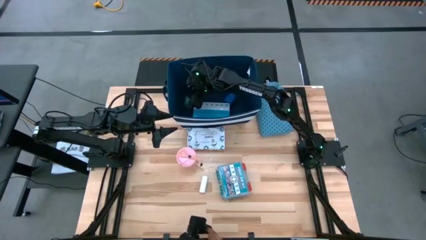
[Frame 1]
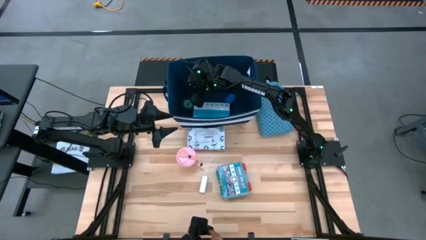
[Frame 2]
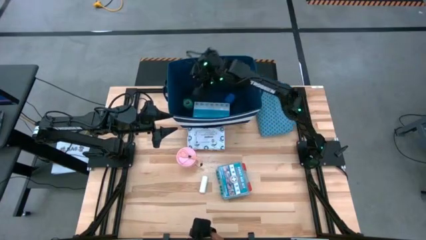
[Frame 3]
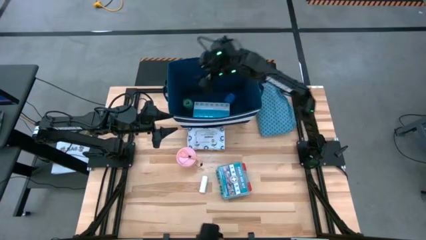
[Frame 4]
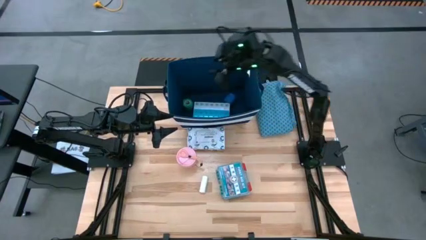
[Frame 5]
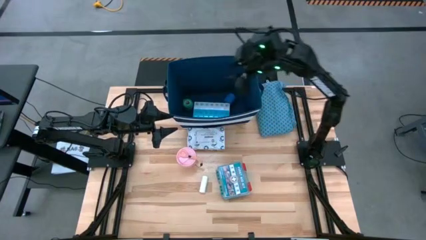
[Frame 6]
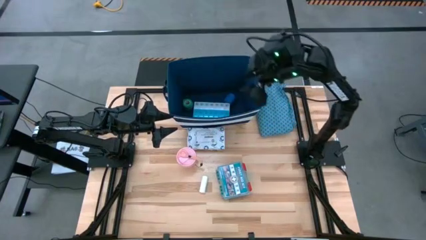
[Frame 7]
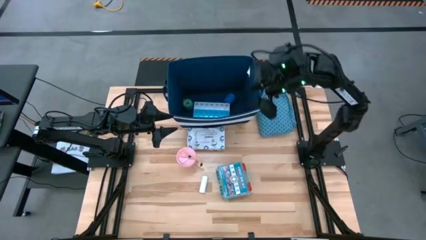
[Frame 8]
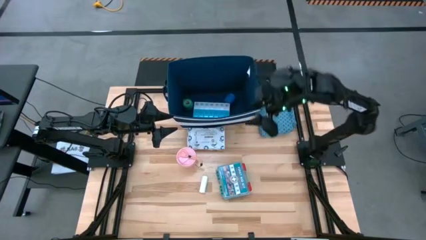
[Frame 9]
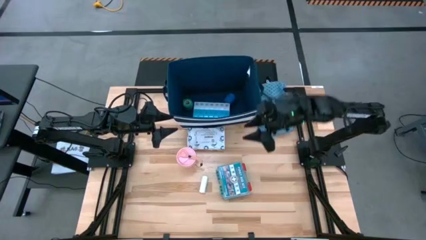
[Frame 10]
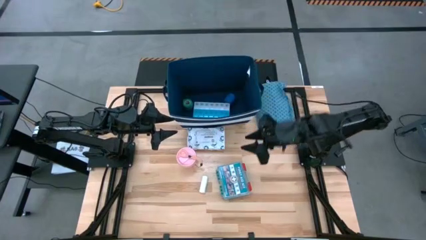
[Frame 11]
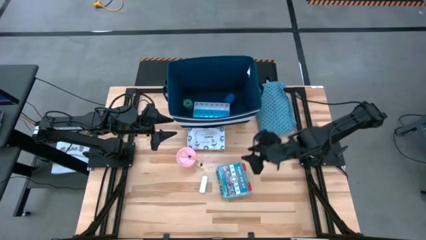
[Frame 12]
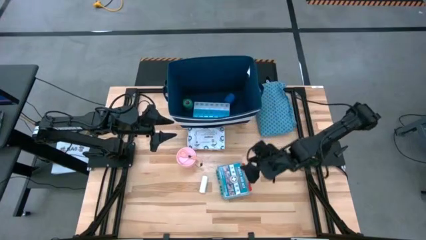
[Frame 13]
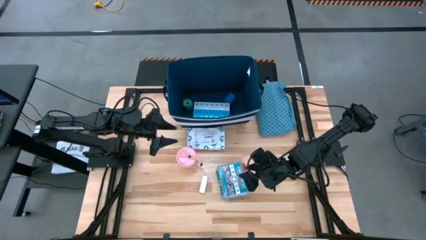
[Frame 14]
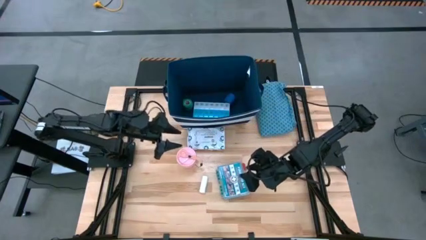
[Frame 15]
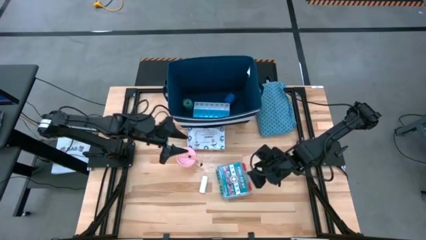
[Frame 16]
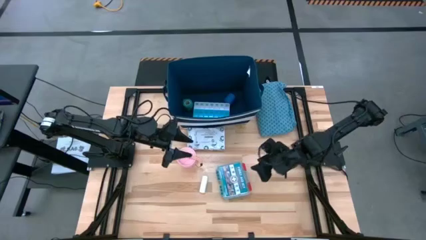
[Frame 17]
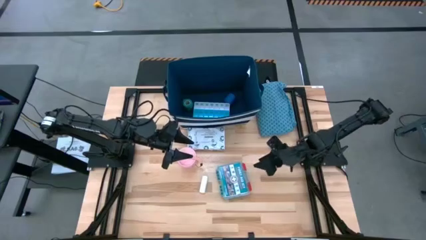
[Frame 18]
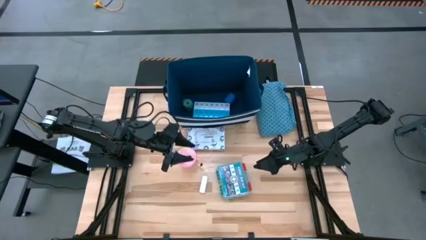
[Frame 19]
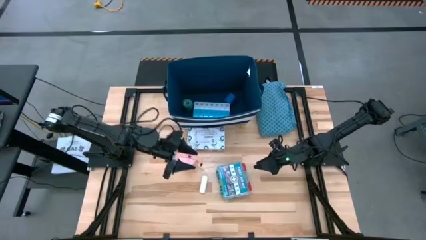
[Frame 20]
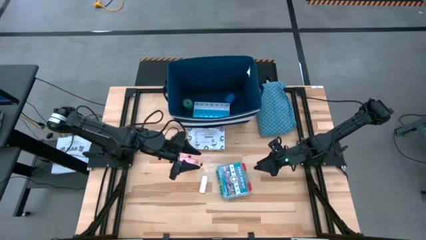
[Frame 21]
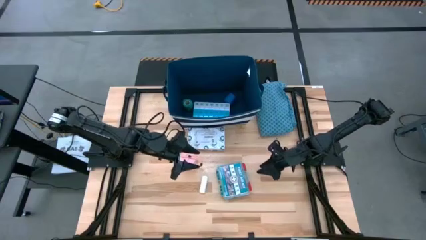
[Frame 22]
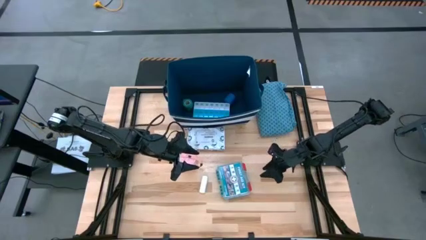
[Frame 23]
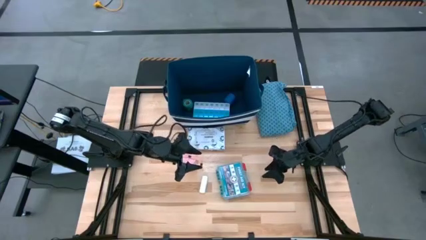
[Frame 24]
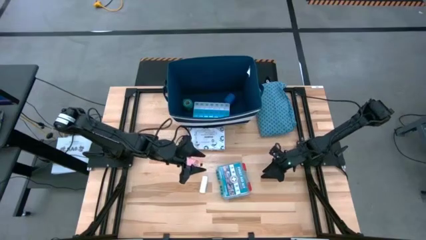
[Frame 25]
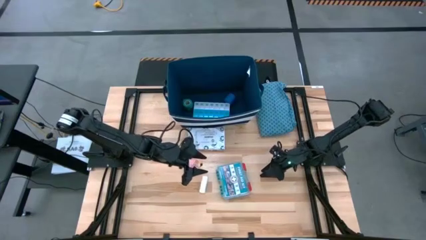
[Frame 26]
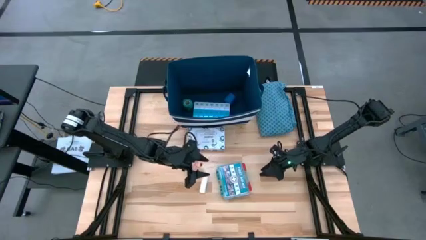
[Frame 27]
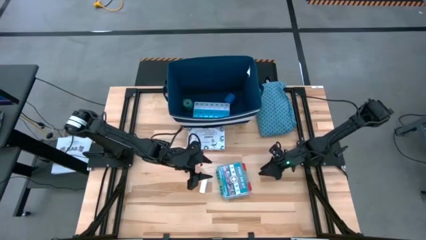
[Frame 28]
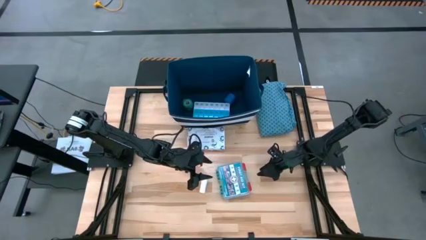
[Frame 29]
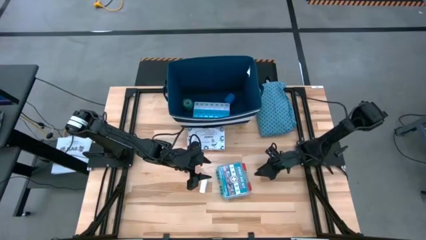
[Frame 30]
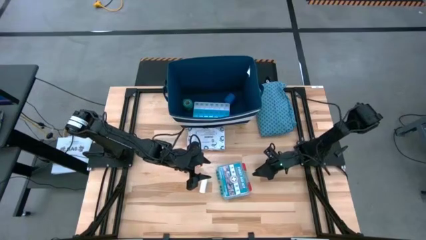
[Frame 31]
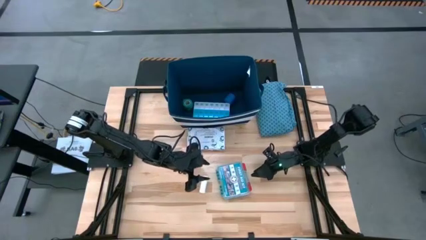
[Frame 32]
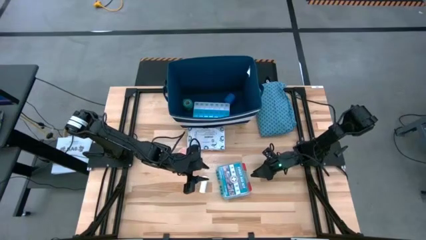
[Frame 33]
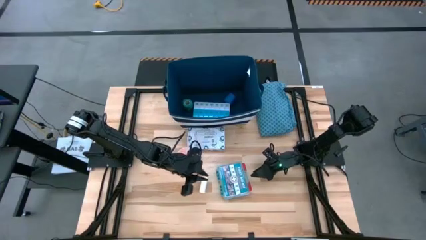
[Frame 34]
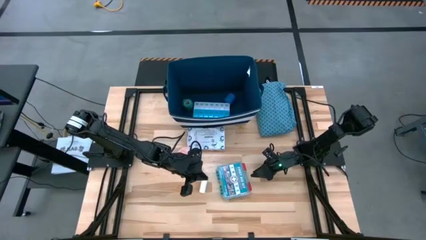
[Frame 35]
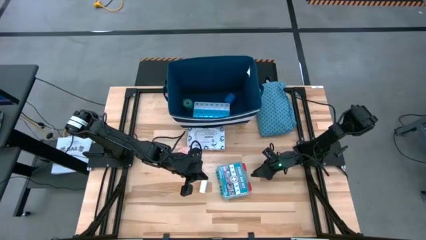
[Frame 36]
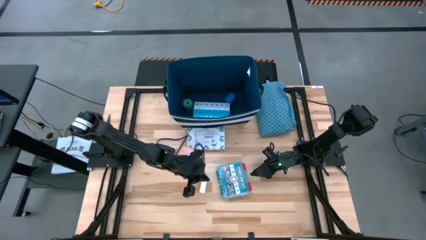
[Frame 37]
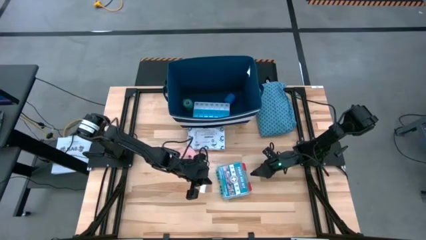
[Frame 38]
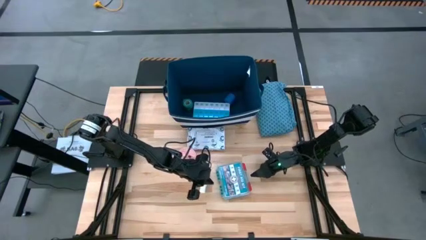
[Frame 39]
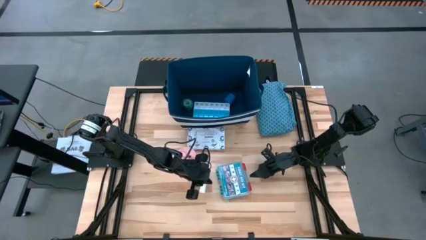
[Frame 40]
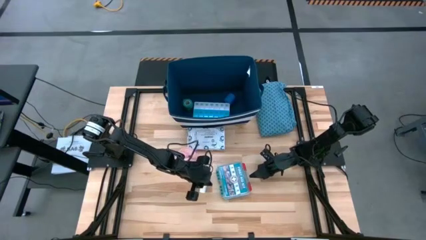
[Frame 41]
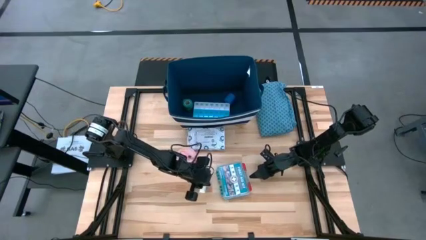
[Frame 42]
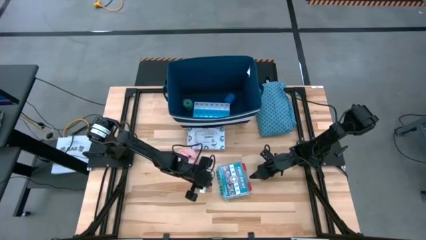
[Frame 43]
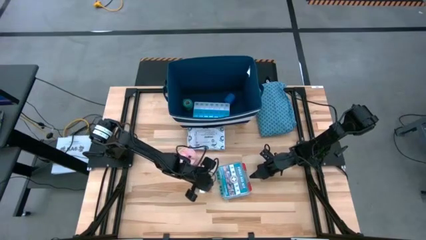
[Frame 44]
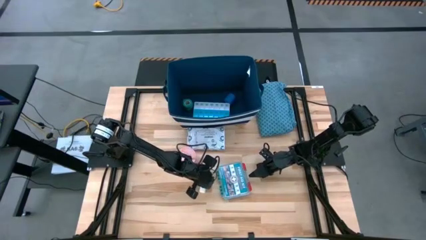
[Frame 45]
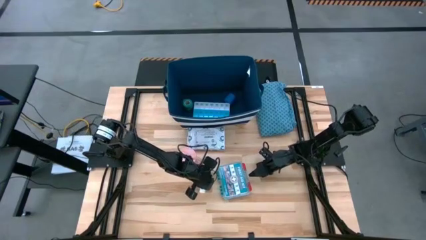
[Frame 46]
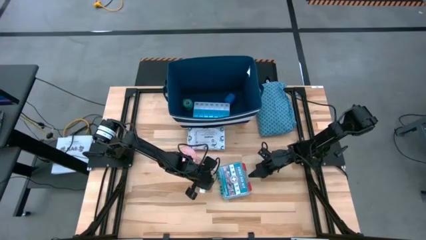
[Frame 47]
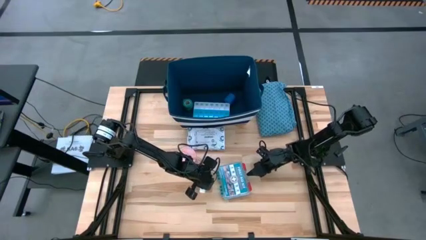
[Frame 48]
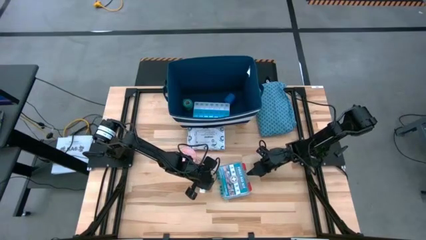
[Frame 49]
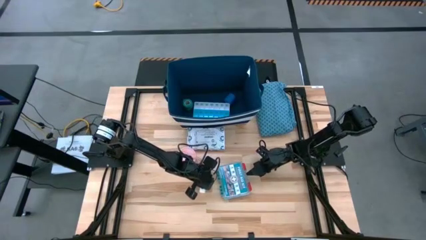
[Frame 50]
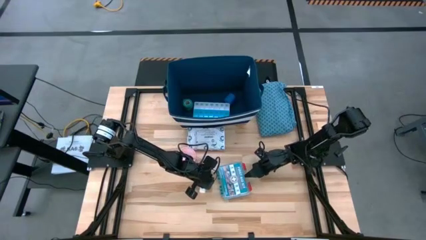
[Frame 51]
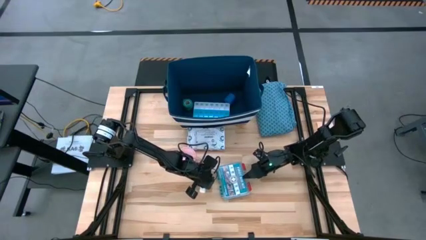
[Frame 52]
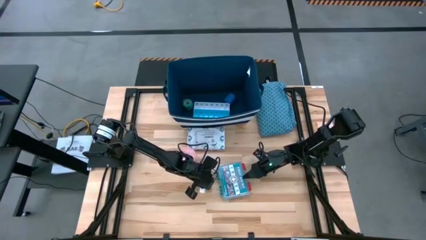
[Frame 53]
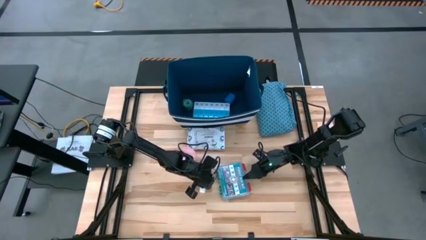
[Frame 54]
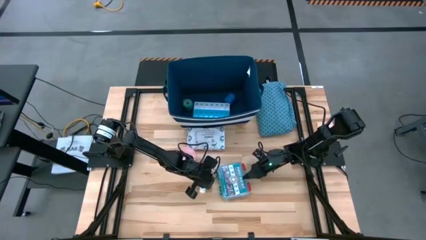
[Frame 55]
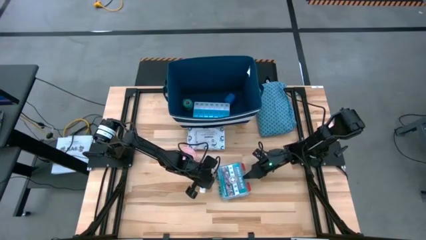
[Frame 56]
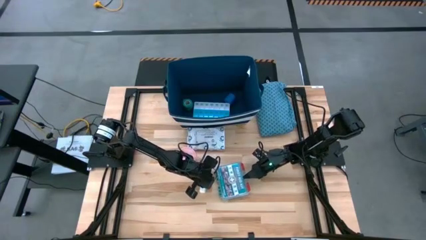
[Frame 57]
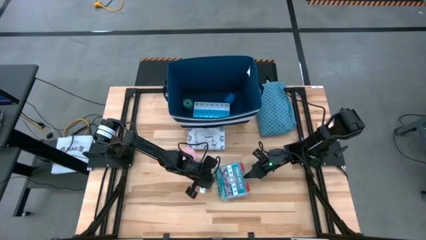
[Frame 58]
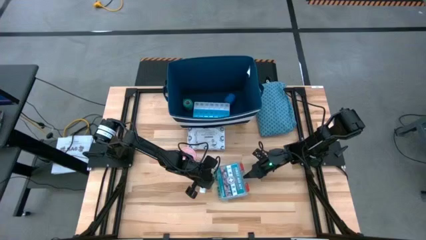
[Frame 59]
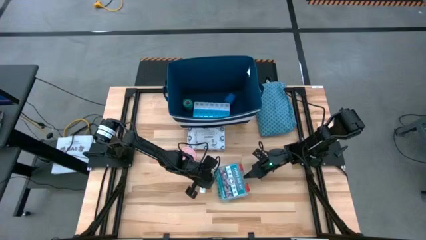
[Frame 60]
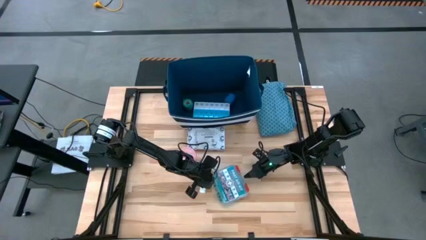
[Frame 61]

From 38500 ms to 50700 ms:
Task: Pick & place medical supplies in basket/bin
Put the first aid kit into the blue bin

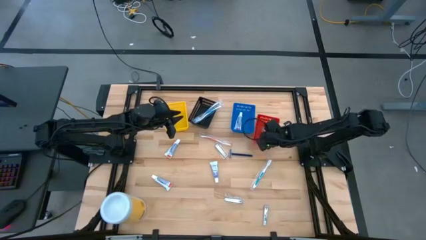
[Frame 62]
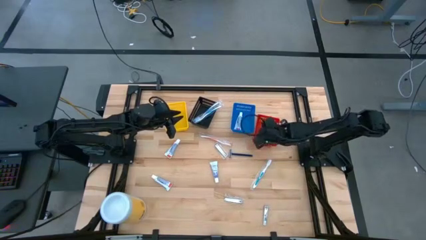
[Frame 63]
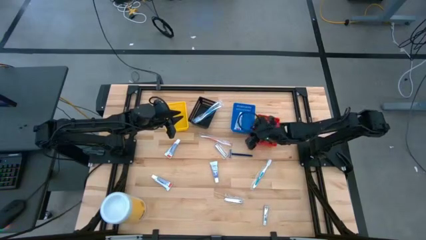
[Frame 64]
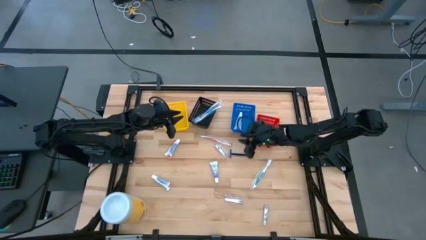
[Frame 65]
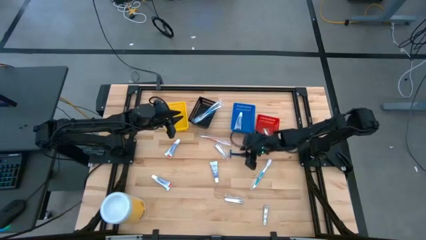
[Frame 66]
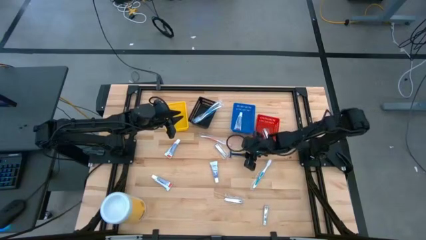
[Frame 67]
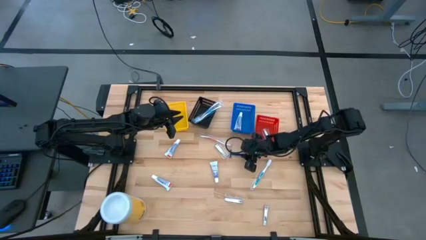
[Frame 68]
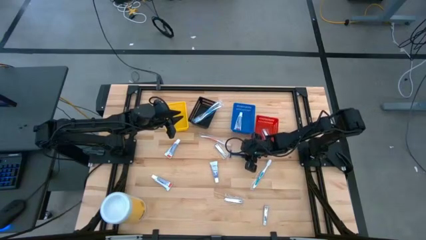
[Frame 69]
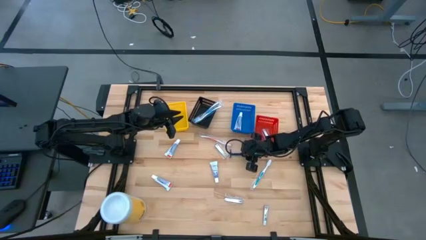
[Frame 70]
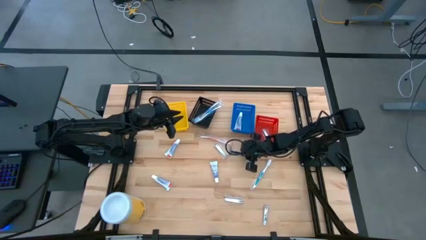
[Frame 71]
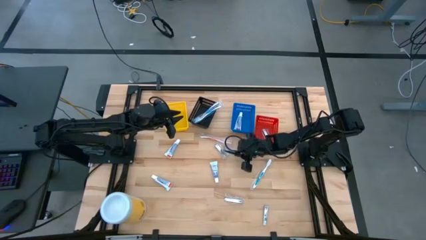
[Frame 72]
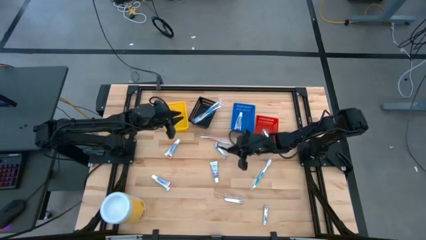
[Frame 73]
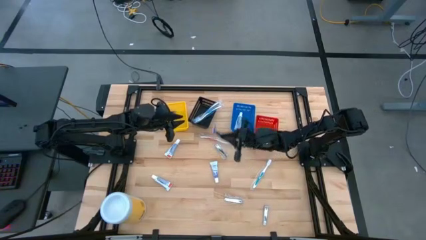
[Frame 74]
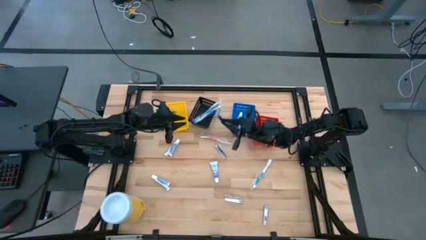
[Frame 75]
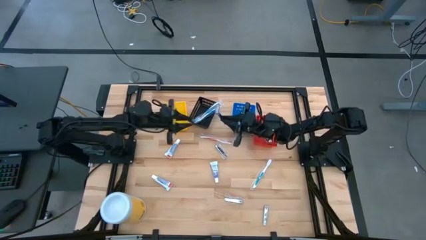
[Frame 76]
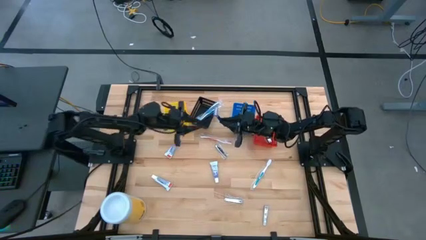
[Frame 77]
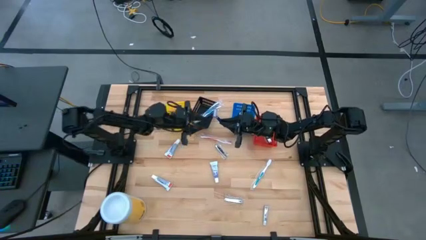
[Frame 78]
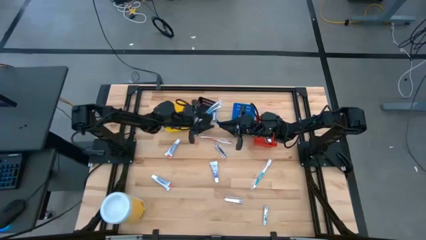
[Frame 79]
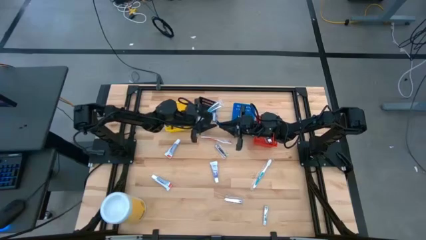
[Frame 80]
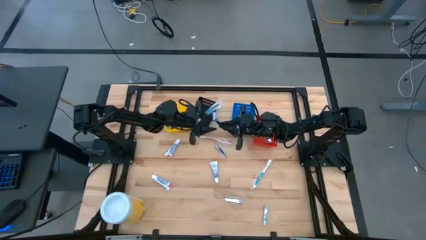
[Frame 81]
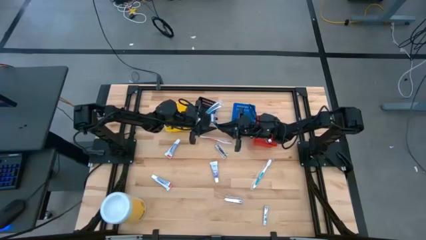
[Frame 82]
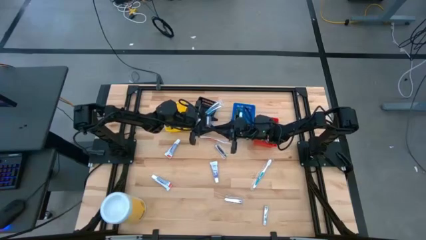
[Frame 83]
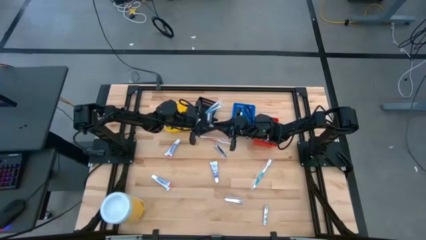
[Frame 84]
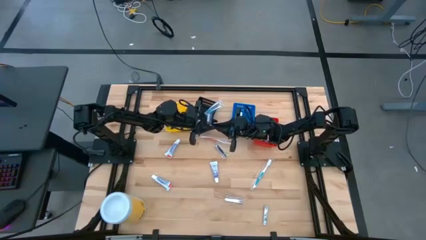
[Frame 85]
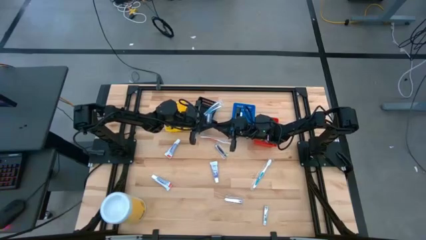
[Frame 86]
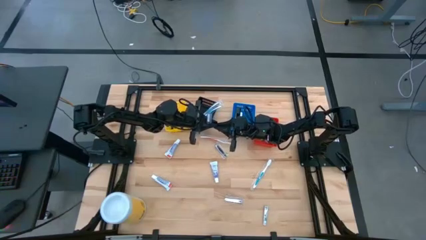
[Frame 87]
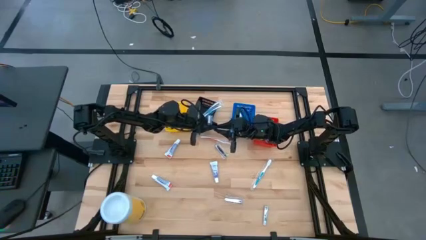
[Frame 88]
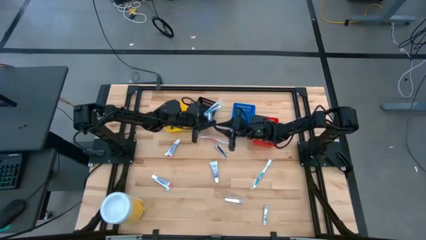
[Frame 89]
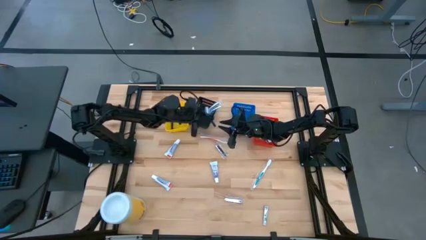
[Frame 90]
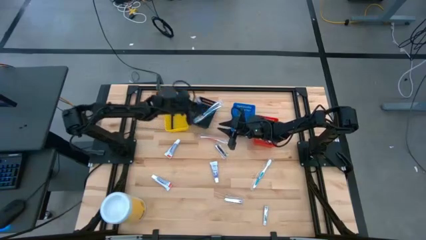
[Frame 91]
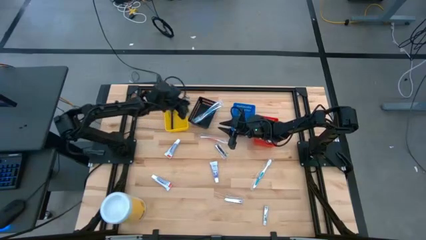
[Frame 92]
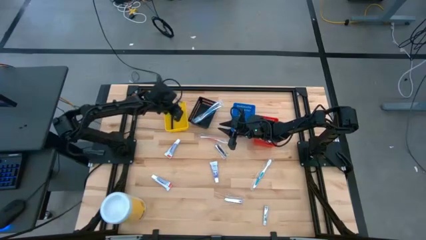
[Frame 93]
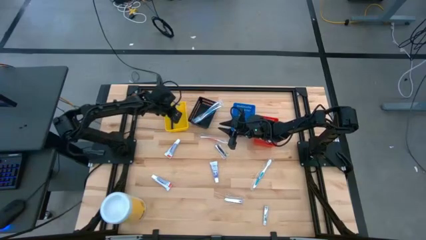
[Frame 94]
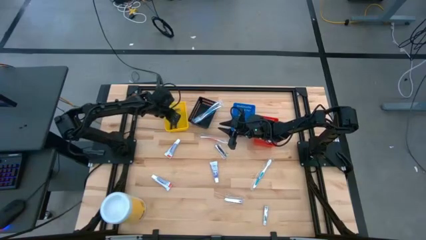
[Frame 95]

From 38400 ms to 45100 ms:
Task: Pick & Place Travel size toiletries
Put the blue razor into the yellow bin
